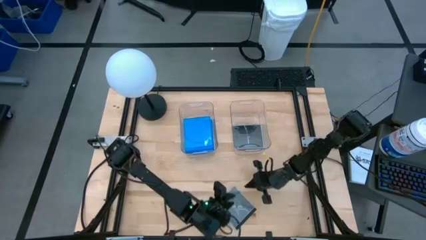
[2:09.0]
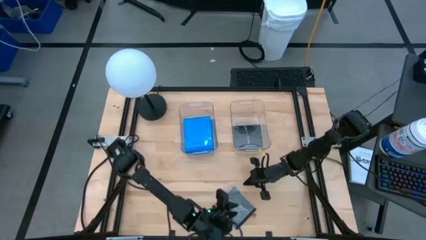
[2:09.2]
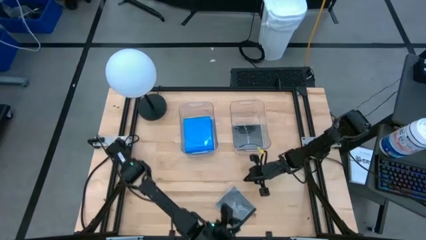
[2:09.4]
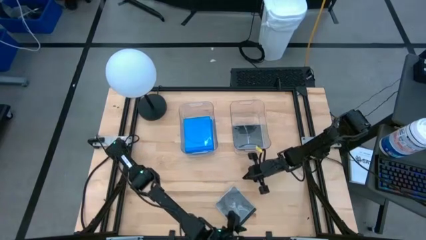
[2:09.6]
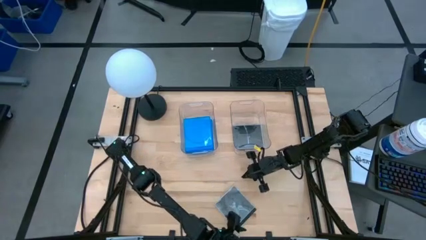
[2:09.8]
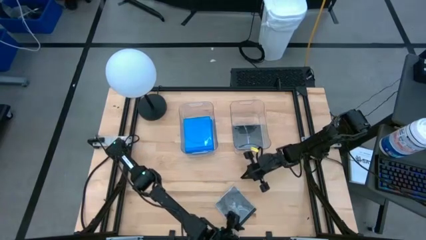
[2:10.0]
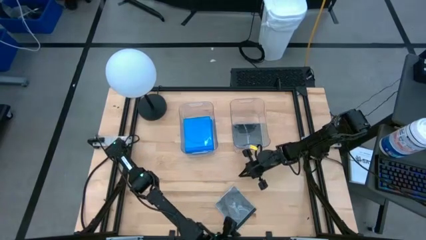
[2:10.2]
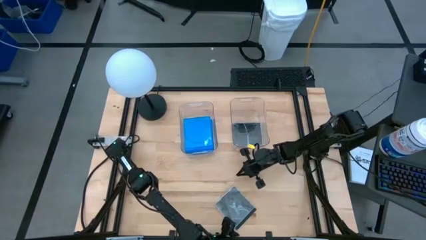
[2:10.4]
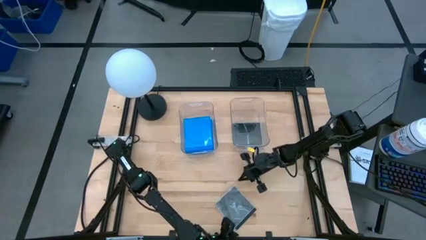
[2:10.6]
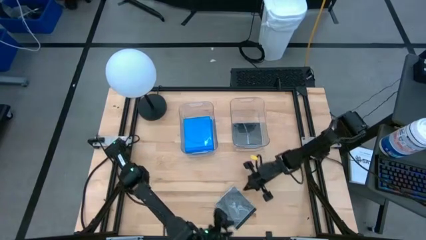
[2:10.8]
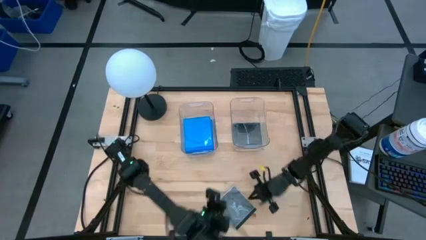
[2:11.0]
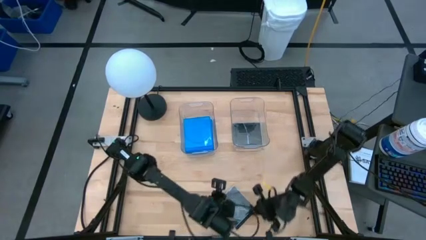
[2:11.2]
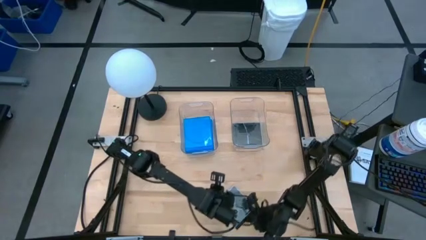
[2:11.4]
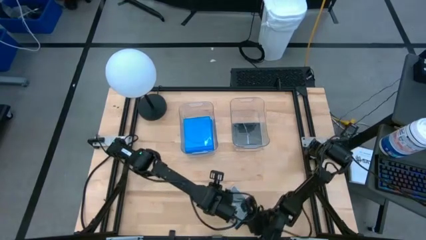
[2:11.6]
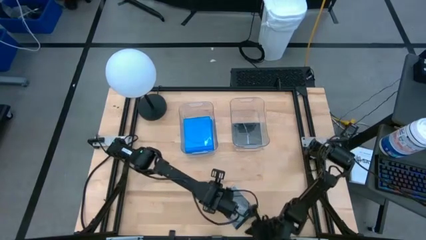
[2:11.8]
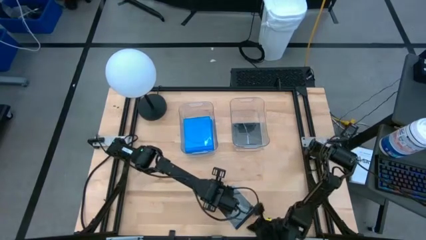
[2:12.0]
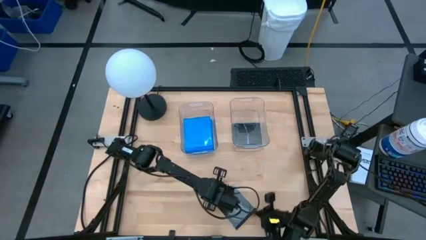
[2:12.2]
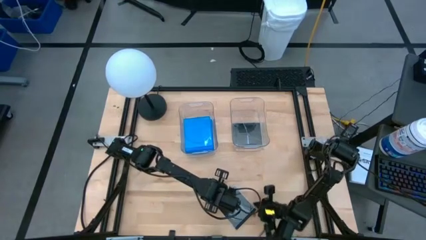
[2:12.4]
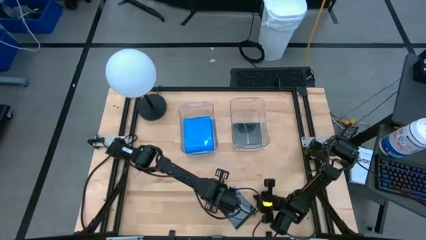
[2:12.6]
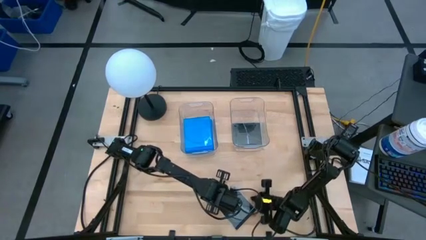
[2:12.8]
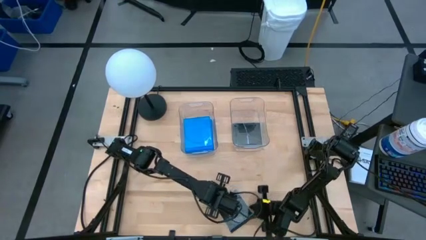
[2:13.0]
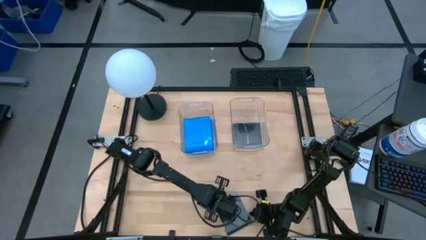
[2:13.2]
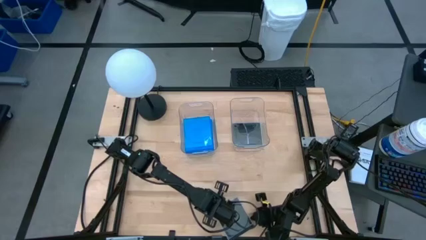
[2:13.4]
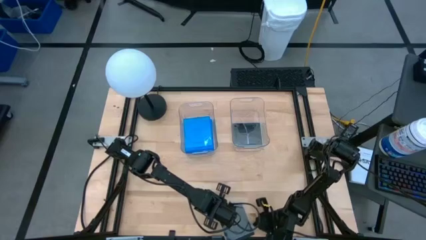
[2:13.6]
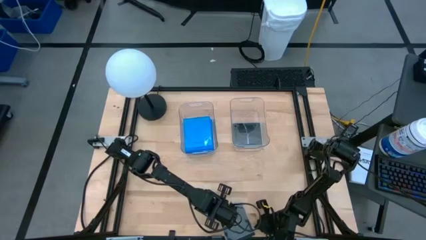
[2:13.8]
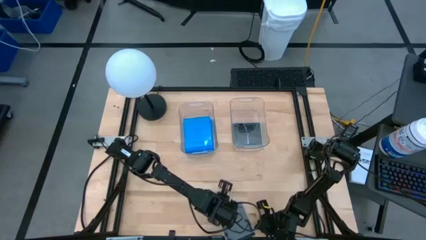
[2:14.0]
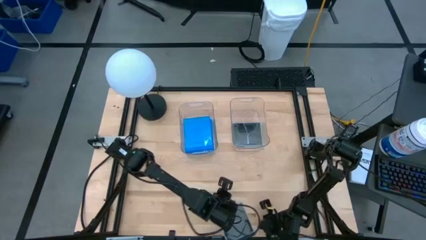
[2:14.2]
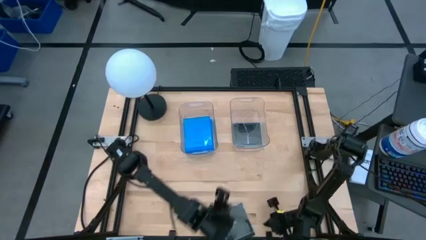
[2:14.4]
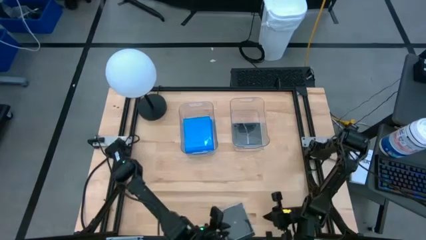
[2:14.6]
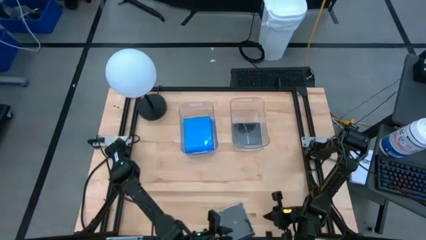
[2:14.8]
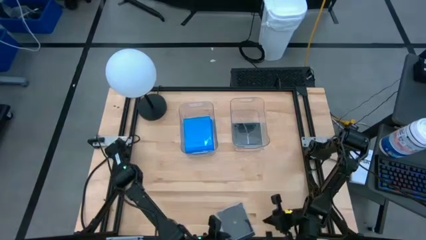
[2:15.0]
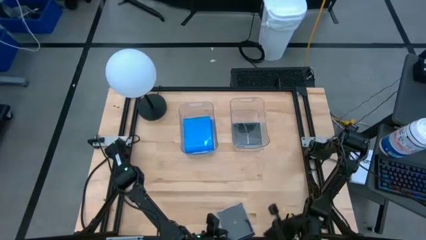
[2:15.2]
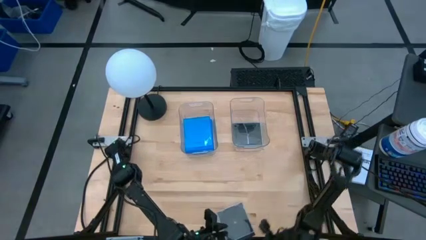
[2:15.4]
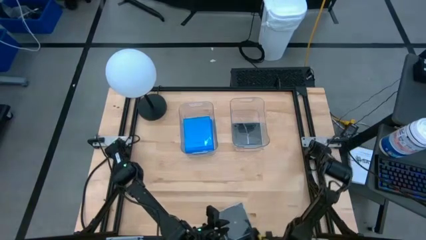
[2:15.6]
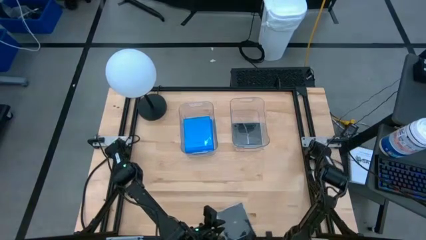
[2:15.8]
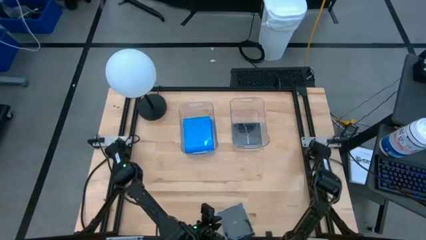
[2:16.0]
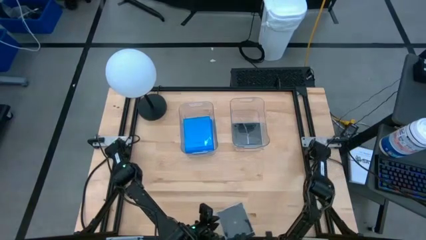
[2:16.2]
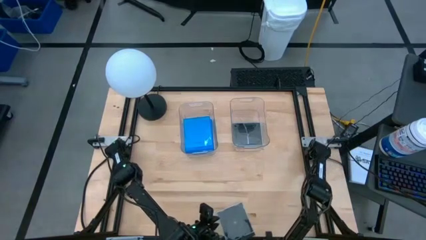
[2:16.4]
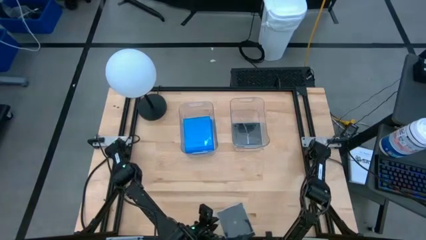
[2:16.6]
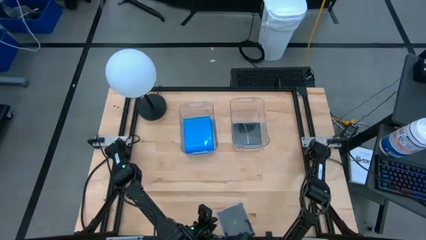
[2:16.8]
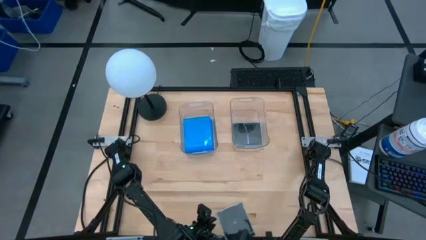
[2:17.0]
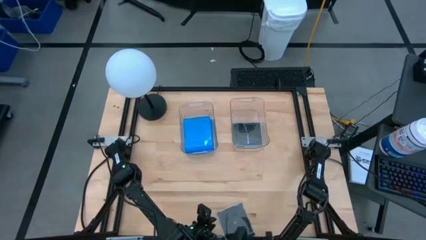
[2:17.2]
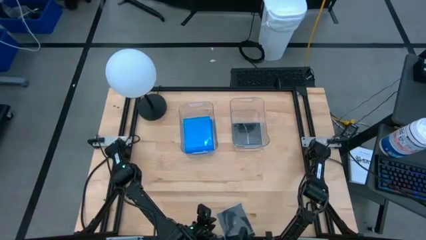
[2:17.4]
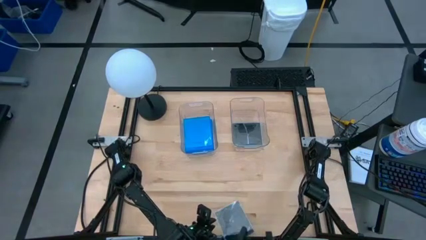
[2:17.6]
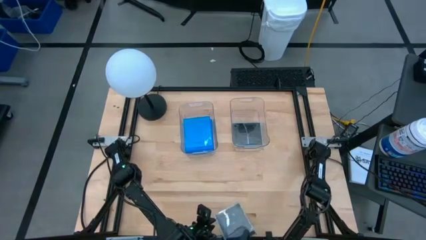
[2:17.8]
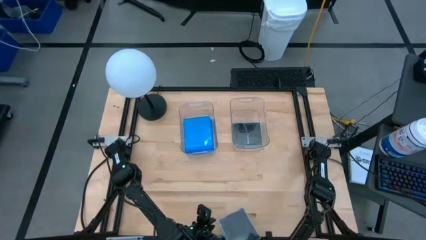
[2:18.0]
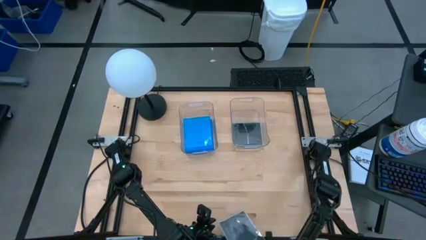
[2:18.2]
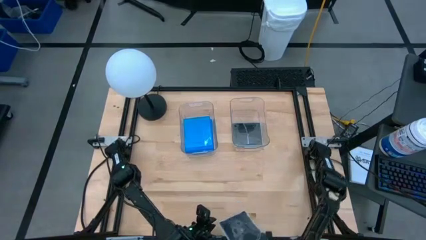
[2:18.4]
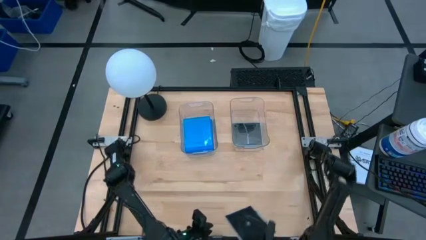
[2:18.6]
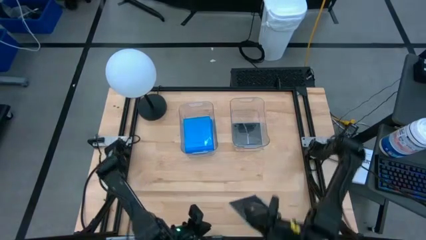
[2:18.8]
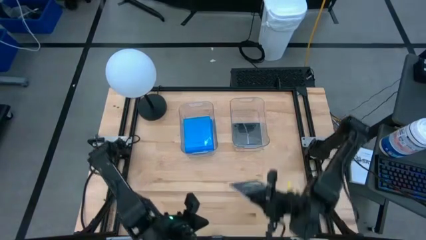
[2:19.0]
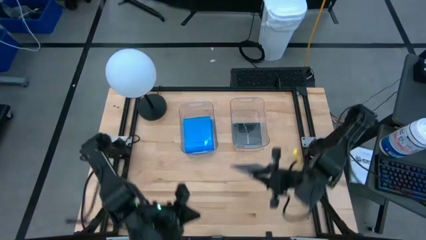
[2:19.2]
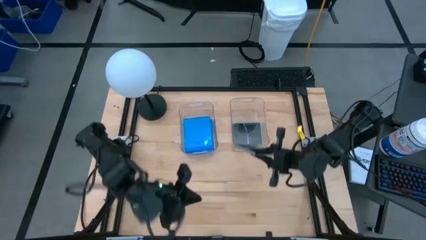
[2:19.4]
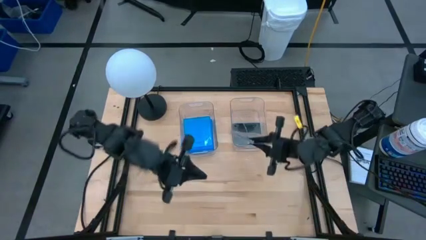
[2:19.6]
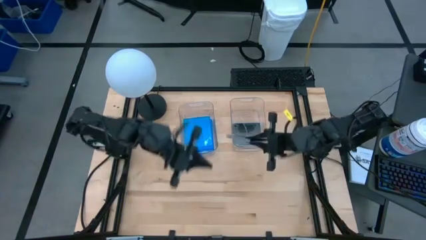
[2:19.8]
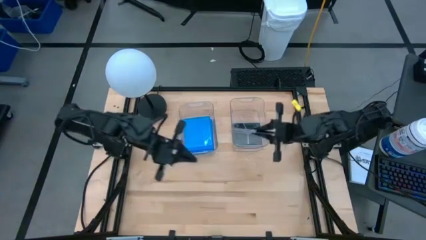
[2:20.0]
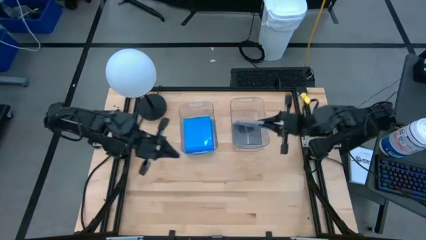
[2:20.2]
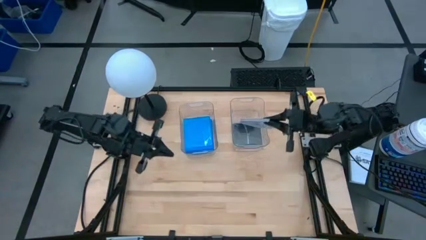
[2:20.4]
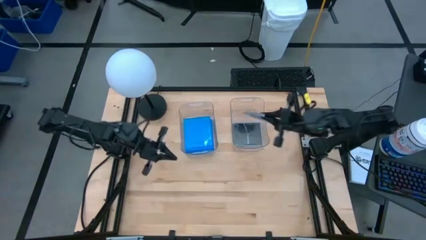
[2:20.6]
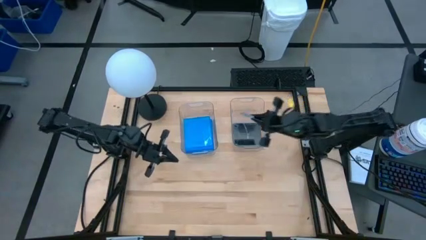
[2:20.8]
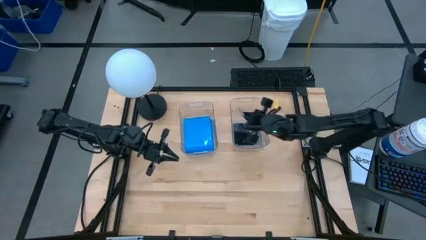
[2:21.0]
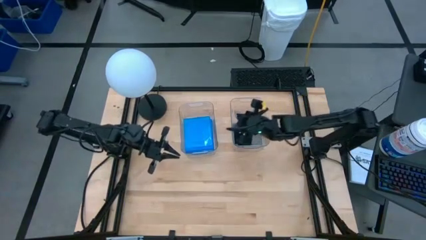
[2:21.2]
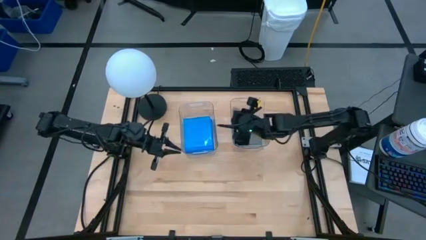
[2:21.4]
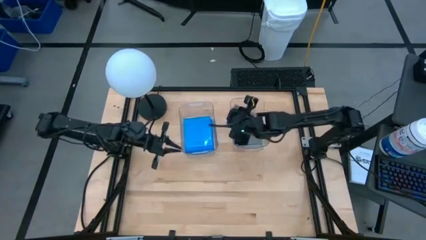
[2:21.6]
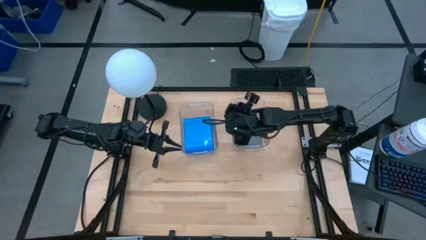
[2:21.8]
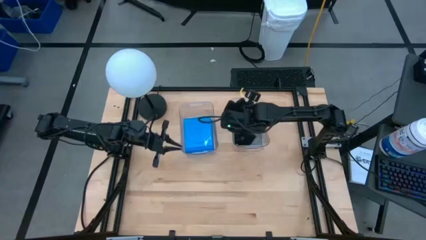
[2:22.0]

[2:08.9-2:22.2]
Task: Pick & place jewel cases by type
Put the black cd case into the right transparent bin

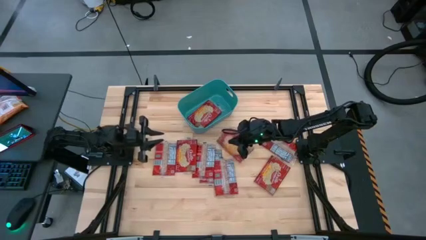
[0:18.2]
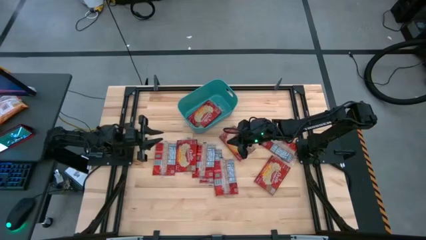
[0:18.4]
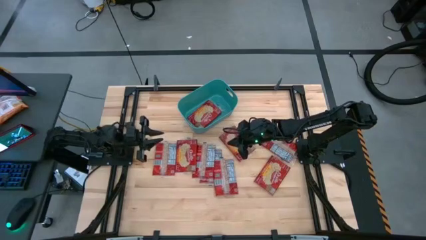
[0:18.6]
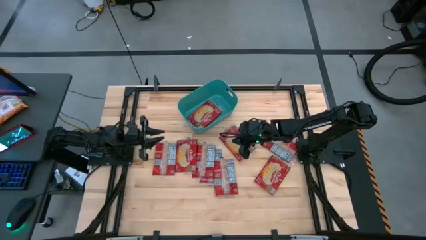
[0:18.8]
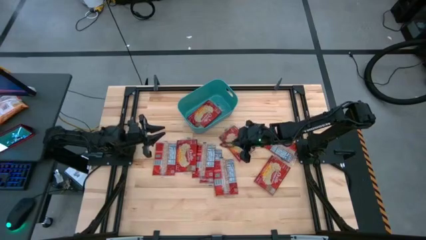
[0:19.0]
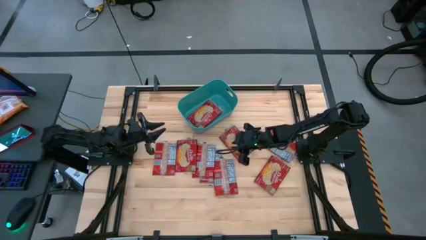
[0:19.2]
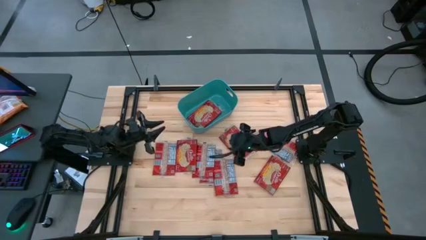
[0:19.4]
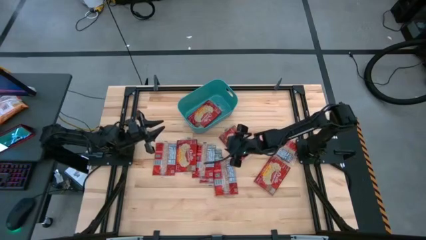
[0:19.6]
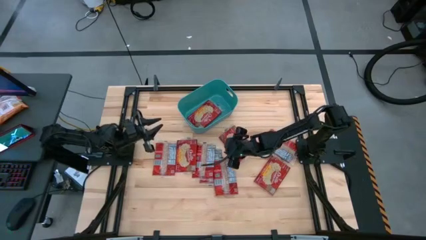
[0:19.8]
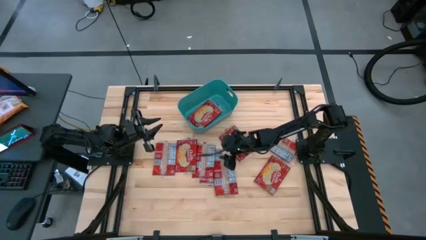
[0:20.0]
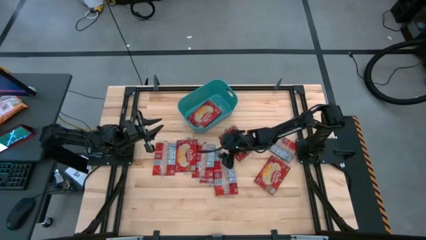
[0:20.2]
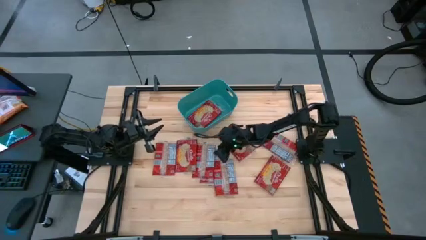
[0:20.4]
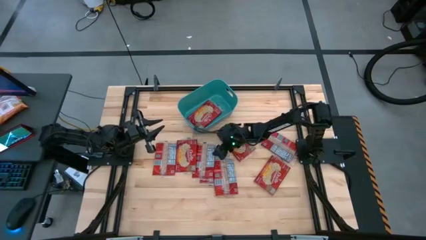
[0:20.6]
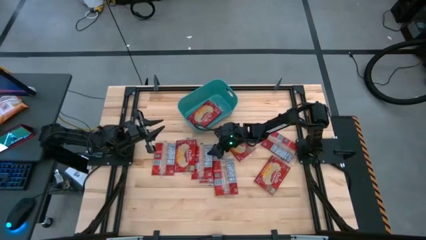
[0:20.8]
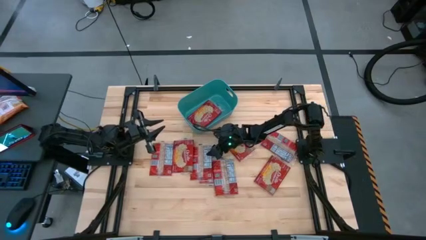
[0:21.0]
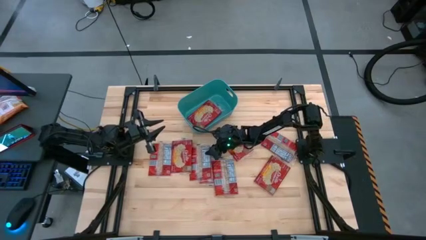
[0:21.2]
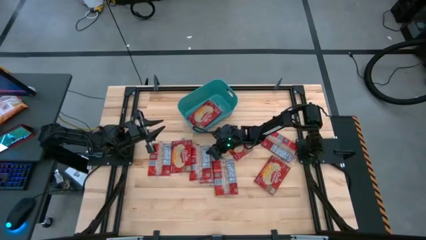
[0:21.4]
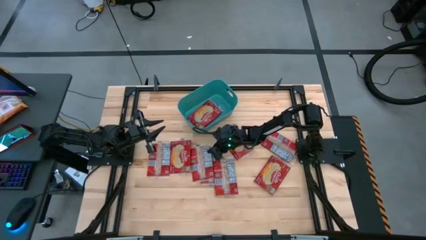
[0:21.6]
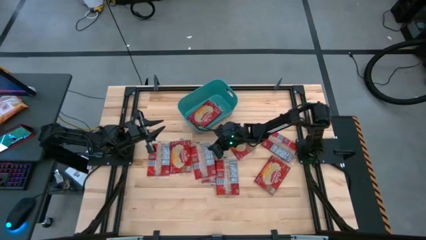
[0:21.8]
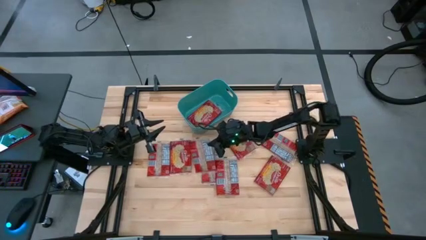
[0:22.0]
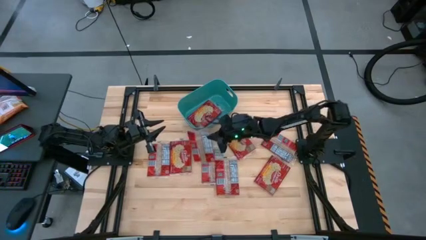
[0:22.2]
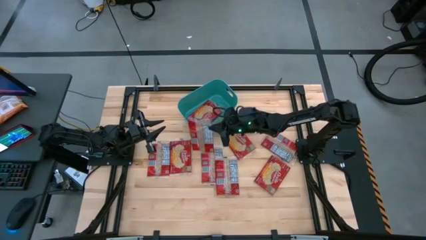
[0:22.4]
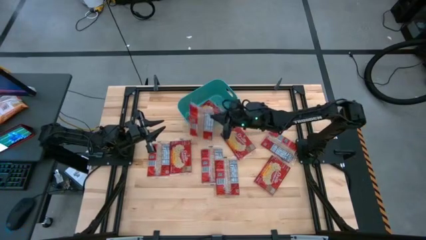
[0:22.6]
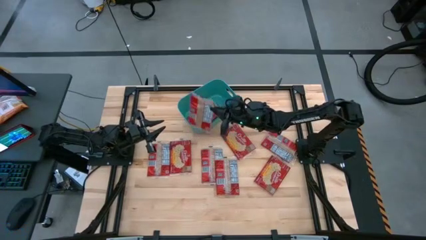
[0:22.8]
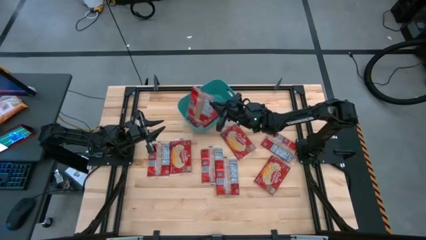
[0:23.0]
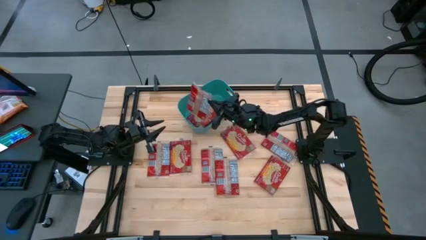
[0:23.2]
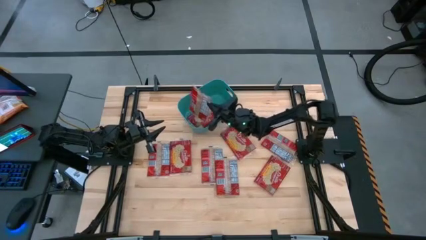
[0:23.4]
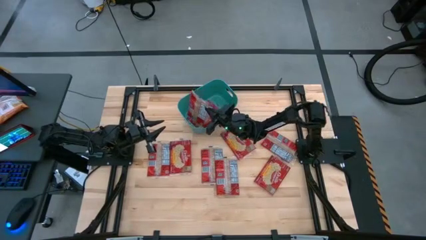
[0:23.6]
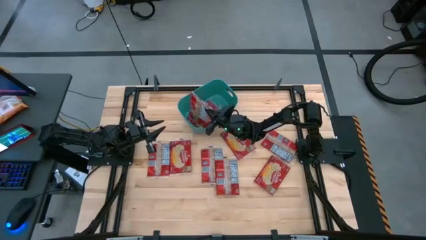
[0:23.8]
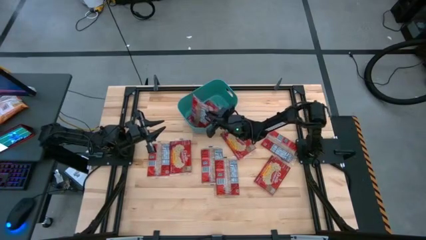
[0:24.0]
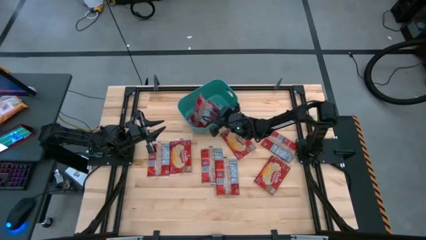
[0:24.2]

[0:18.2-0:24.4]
Task: Sort popcorn bags into baskets
Put the popcorn bag into the blue bin
